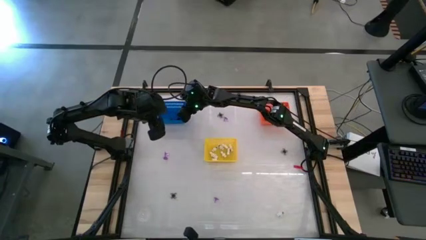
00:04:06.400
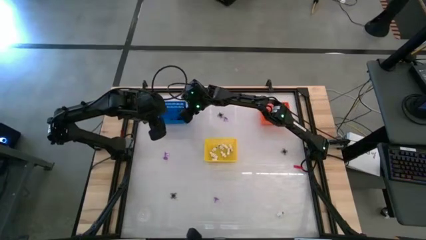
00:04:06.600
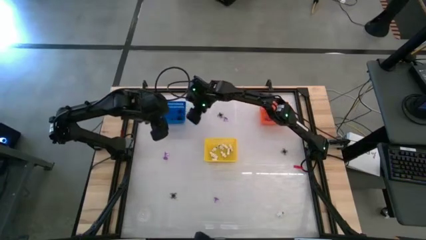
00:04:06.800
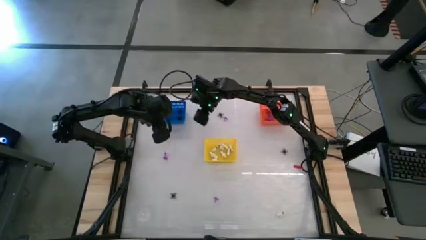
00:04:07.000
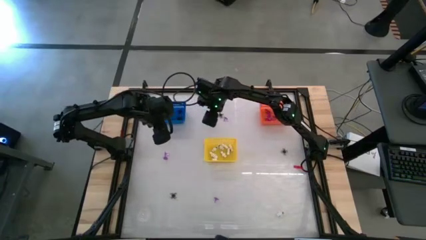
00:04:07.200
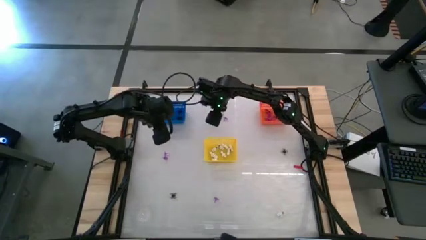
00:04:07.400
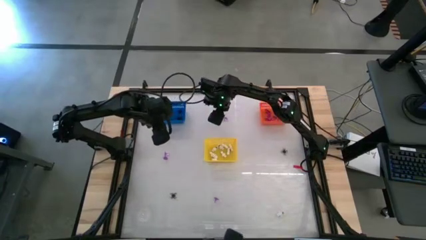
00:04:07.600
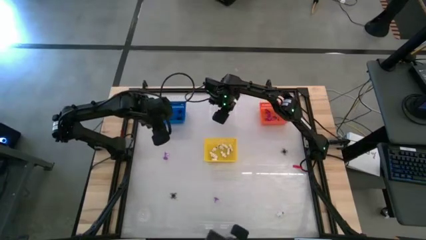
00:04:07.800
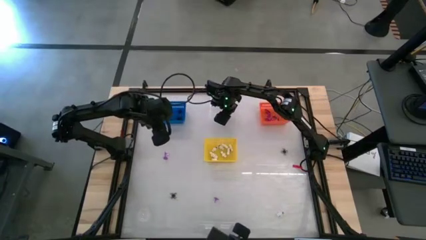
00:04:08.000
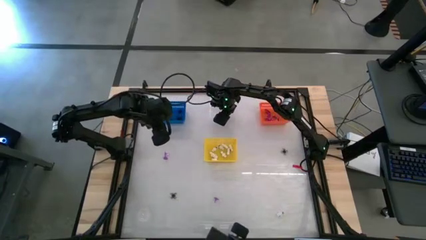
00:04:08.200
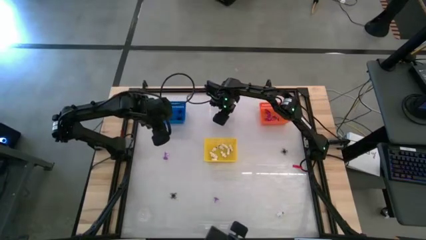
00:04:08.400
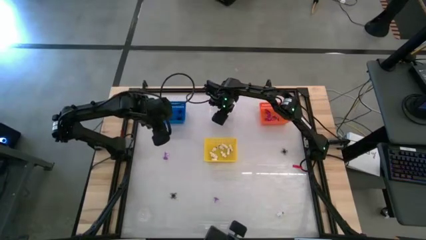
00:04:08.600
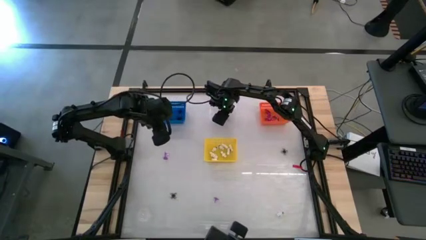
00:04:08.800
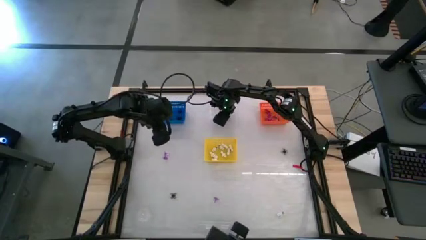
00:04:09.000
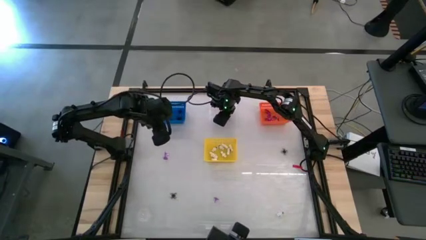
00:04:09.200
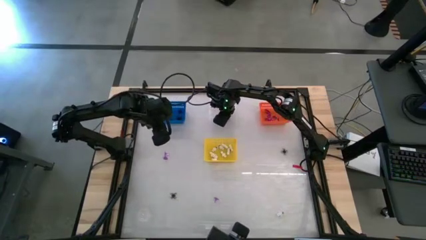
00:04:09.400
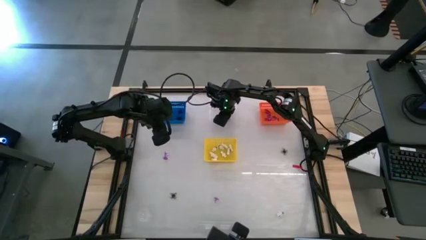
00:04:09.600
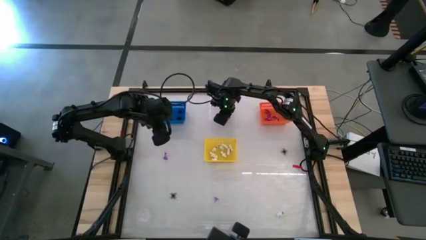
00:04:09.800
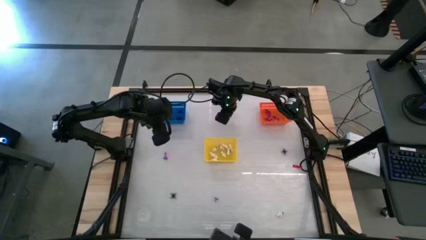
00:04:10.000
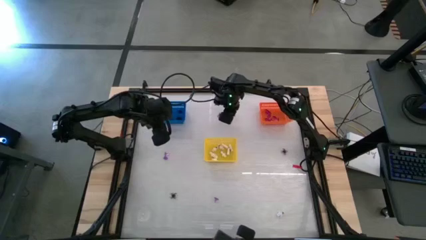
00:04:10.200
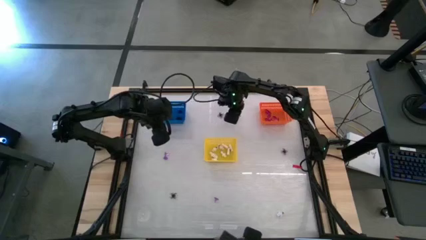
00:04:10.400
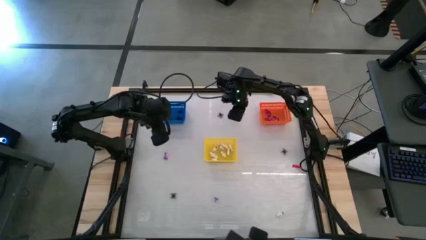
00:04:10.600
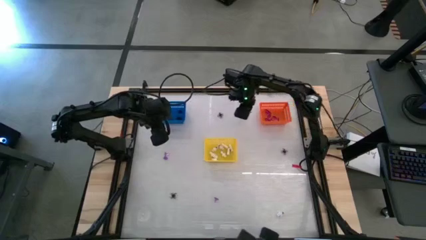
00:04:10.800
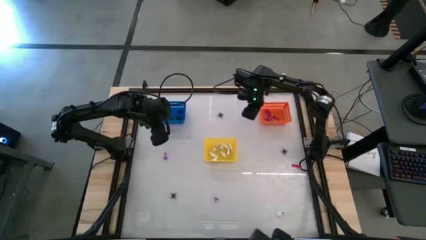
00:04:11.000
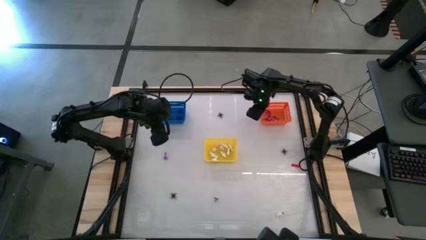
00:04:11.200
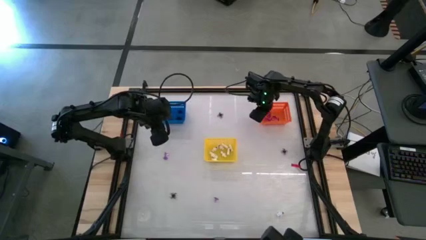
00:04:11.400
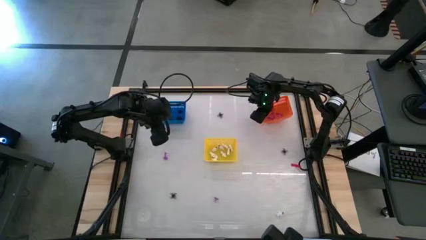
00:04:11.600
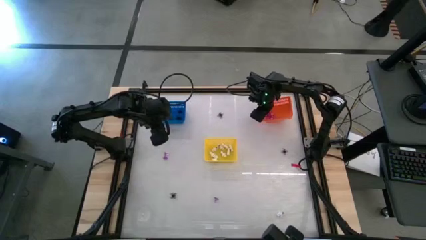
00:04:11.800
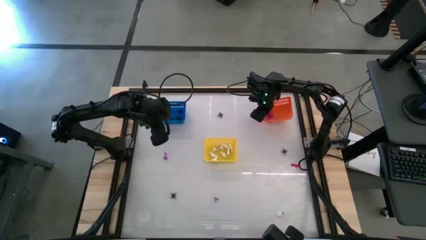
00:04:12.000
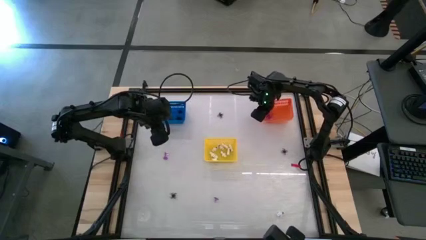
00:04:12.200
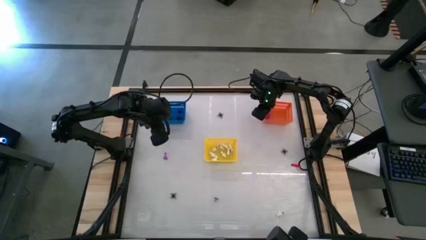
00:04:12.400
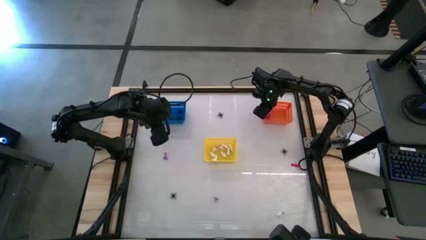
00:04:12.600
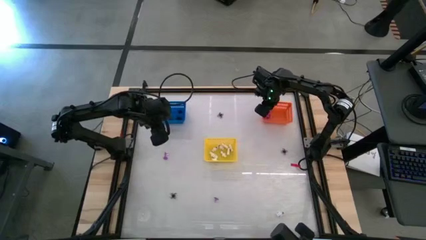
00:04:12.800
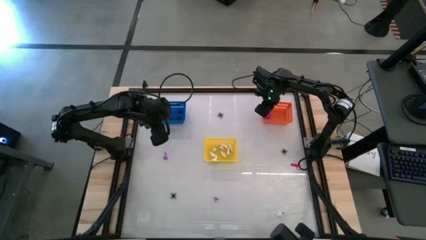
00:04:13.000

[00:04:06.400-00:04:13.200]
Task: Sort Halloween decoration
Put the purple witch hat toy into the orange bin

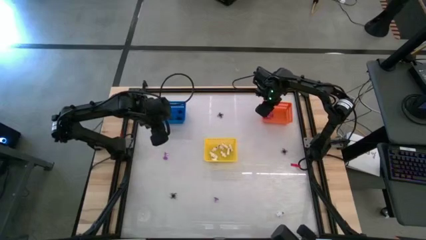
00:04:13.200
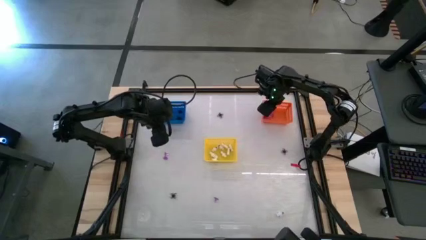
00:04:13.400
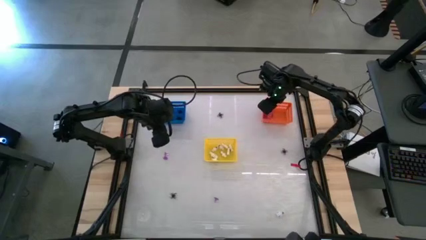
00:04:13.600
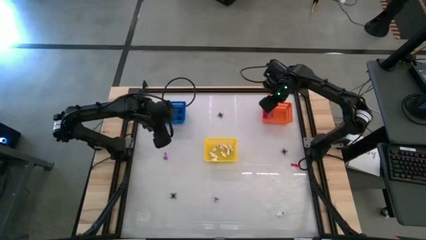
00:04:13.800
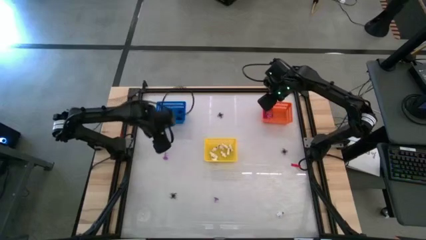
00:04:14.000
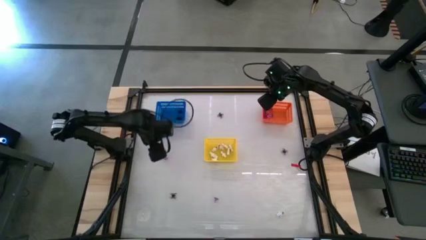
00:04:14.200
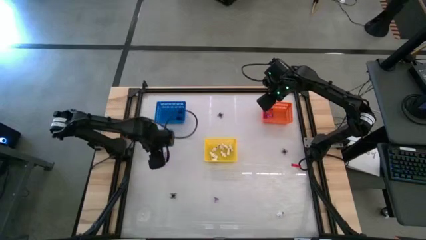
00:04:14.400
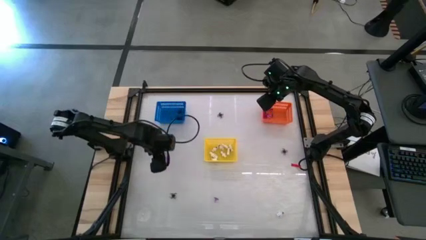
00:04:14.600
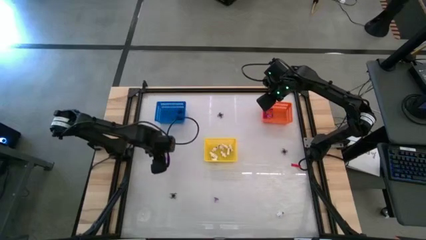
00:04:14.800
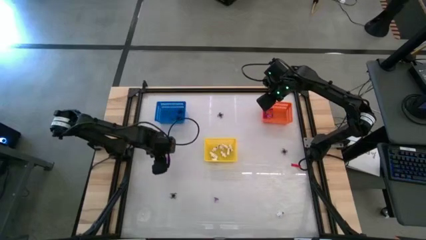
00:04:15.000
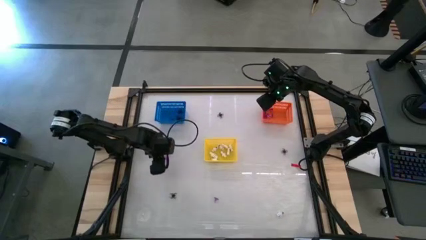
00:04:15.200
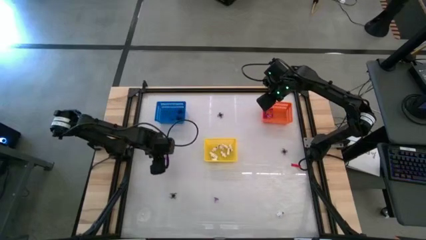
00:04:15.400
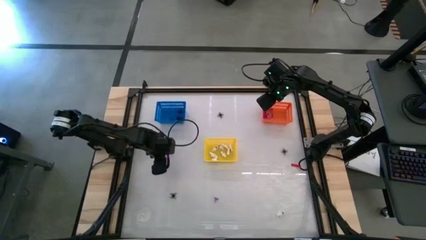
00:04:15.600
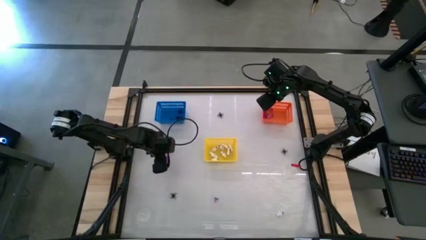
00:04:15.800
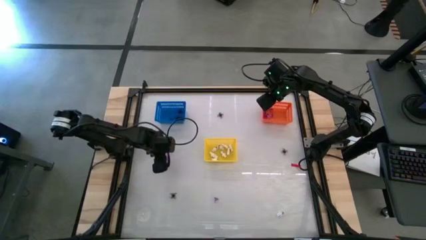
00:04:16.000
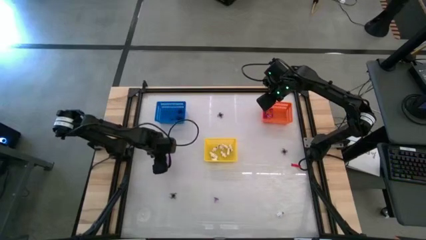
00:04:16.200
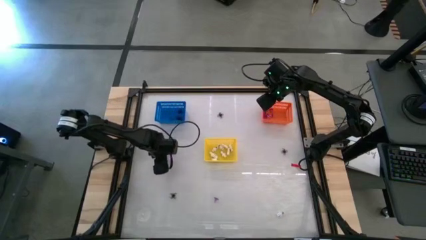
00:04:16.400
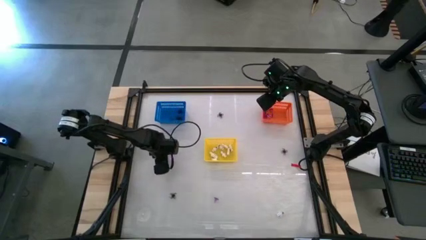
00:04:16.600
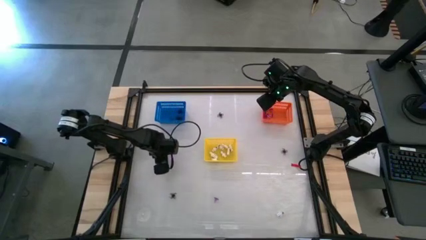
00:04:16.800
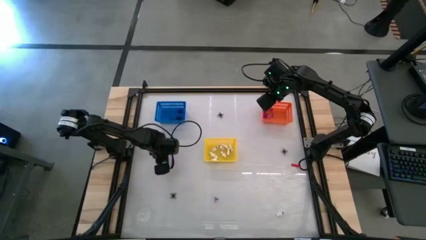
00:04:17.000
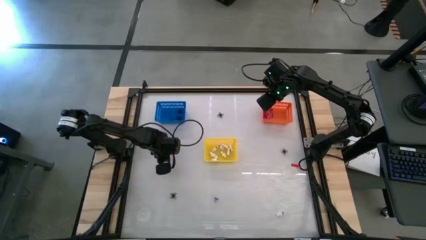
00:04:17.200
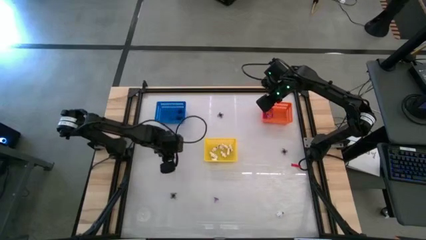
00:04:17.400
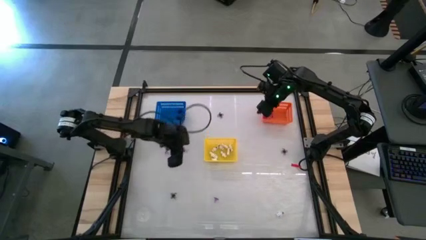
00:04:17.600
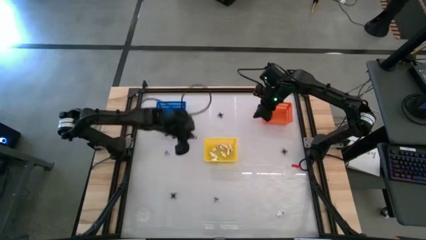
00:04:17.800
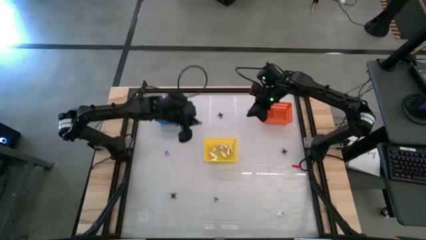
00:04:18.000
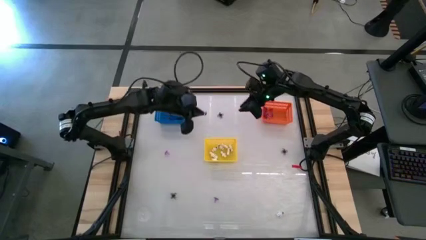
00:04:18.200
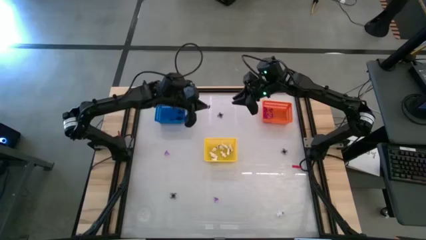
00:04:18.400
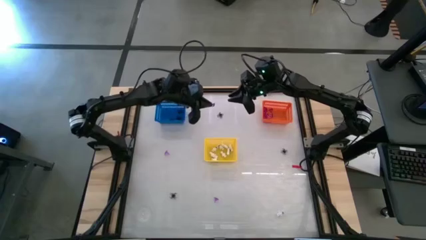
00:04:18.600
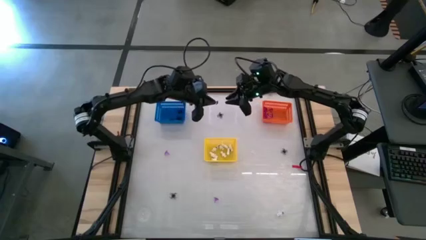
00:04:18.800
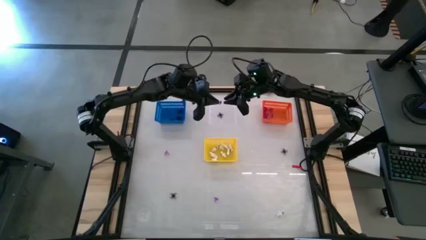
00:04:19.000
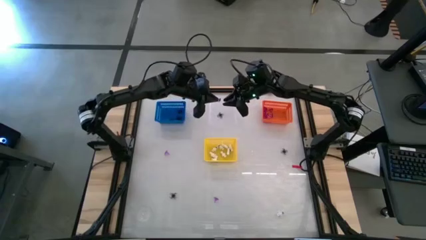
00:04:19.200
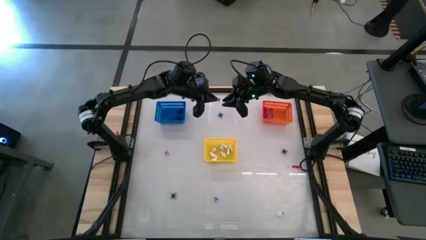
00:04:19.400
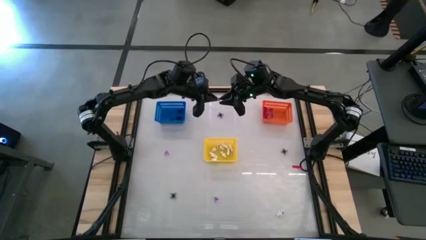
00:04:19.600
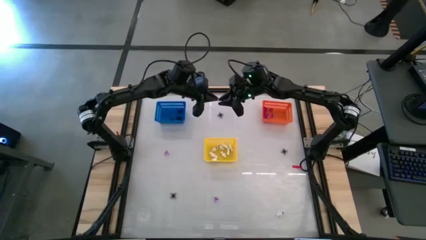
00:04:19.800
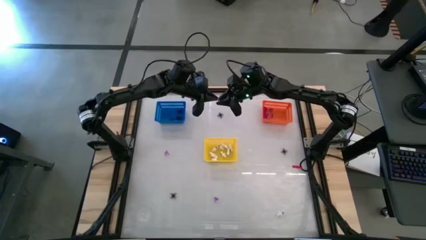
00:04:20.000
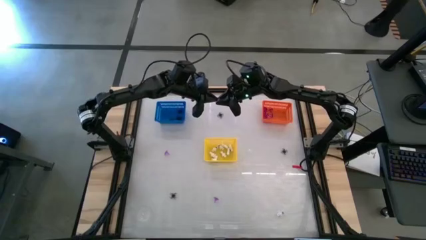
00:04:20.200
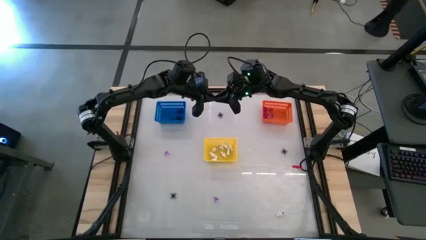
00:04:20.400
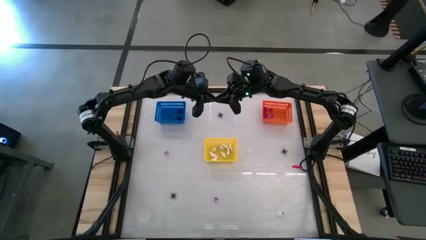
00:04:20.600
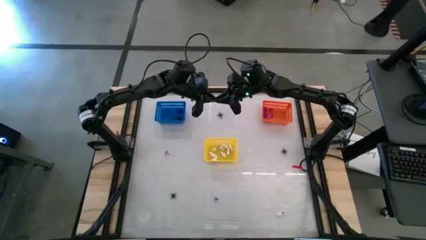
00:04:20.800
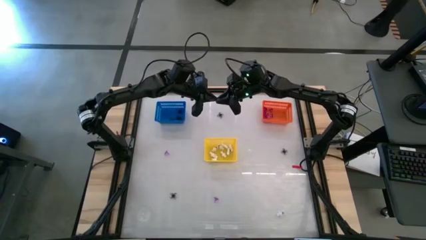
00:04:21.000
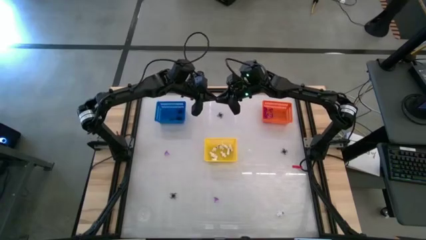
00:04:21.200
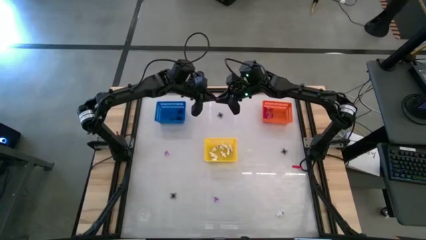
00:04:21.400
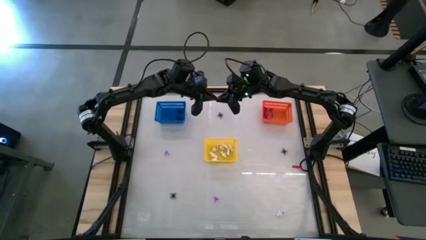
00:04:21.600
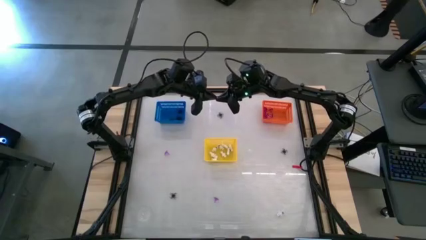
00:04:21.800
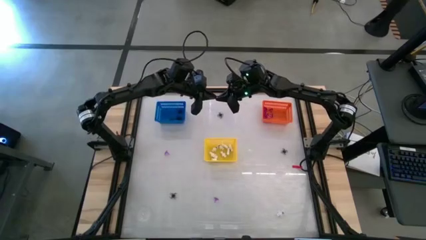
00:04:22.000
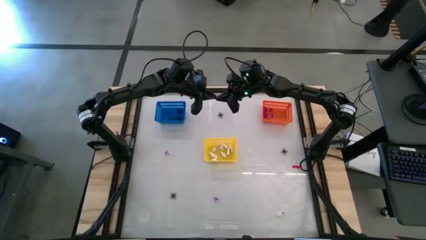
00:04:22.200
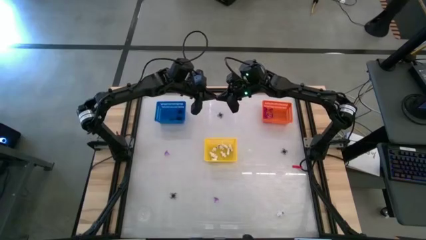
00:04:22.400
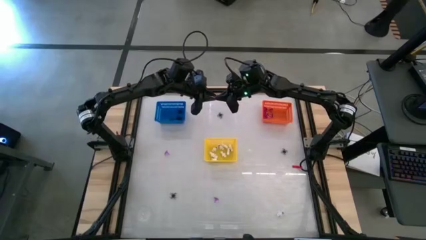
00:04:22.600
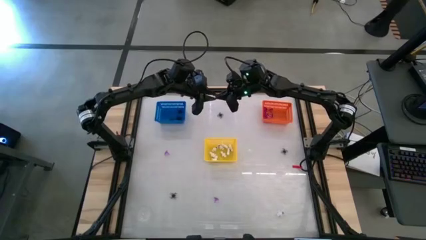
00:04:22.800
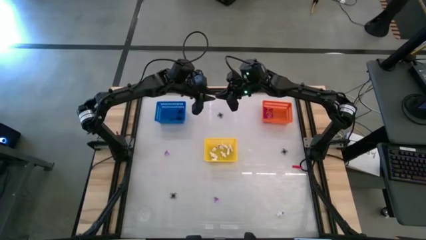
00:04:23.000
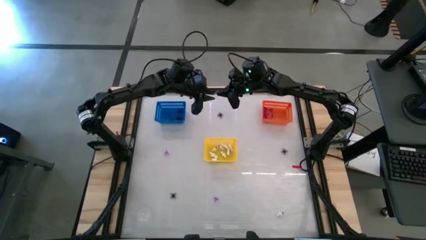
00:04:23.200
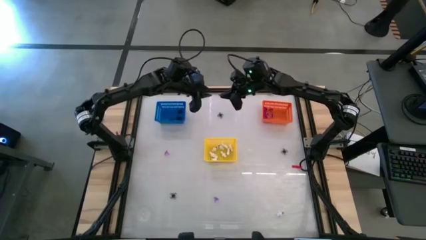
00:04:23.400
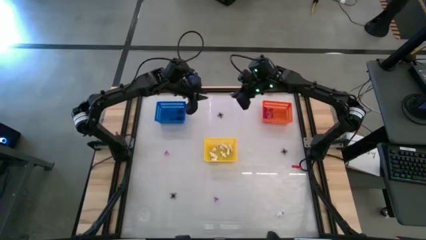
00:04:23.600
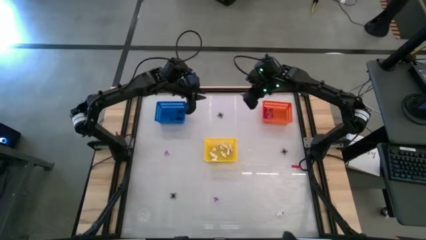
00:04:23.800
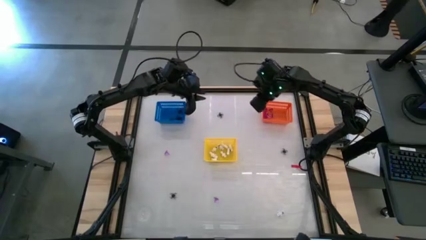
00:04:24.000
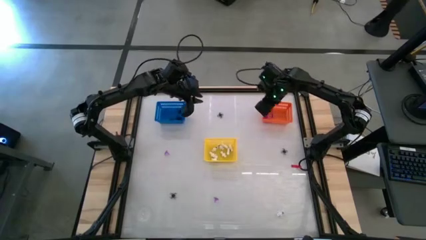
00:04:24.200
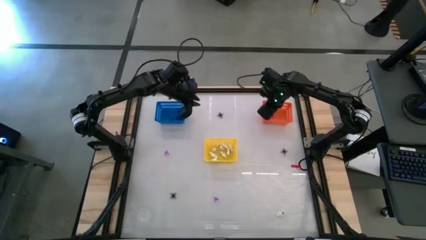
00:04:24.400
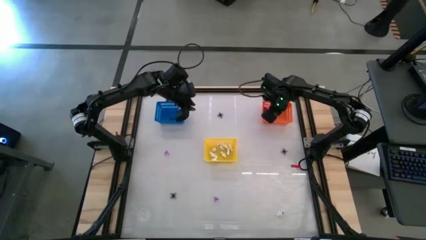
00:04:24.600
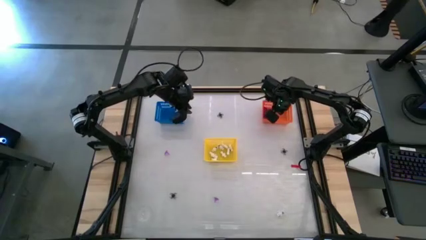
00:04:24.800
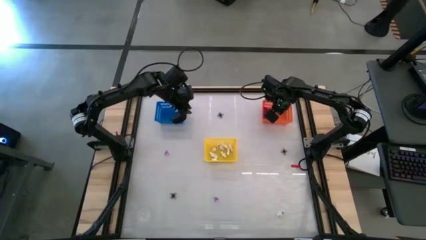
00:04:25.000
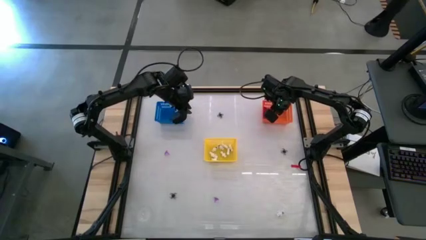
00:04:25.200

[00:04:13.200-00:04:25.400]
Put the purple witch hat toy into the orange bin
